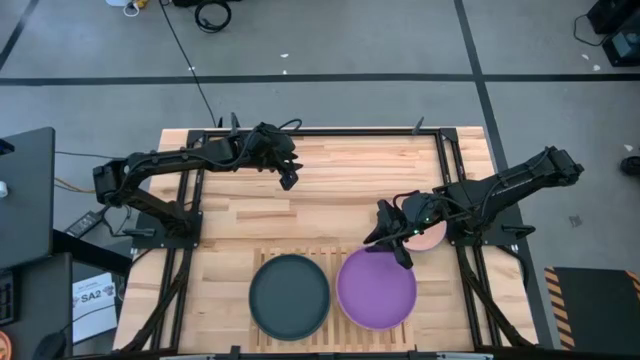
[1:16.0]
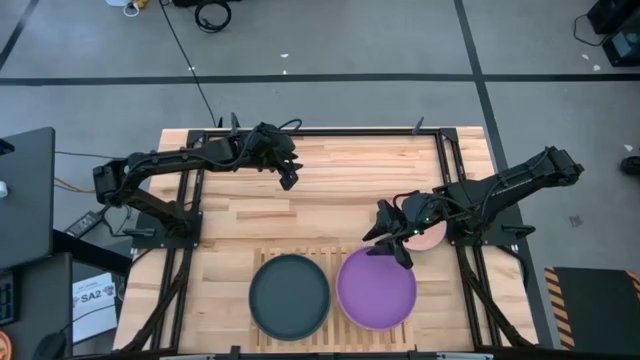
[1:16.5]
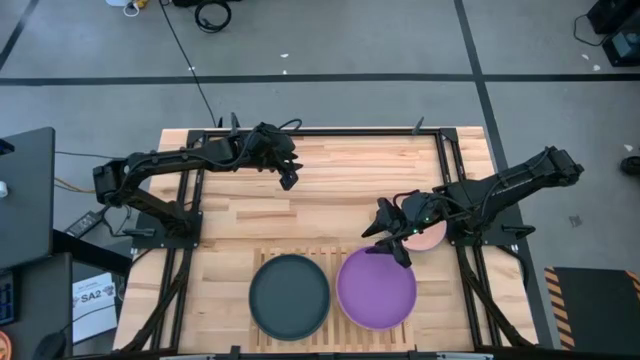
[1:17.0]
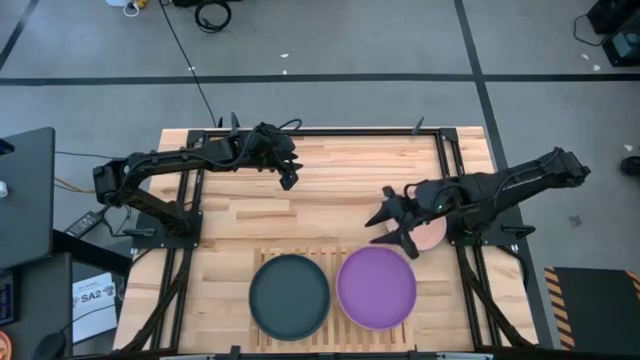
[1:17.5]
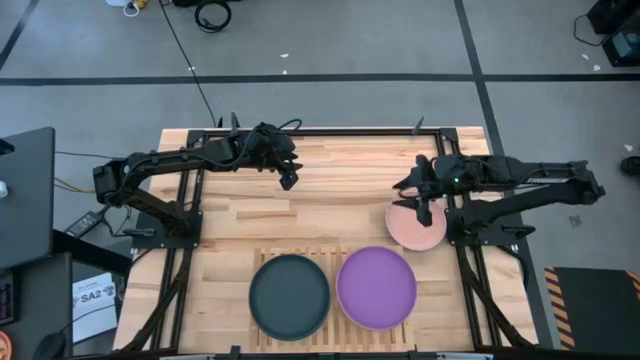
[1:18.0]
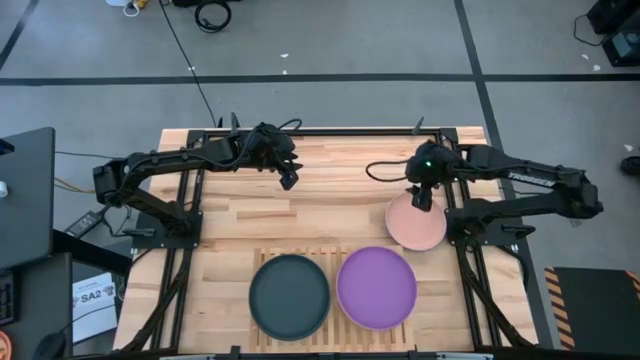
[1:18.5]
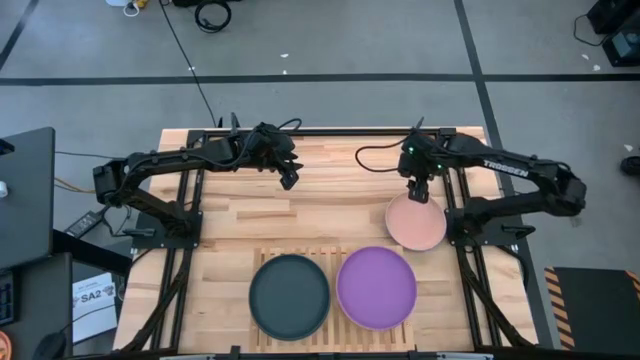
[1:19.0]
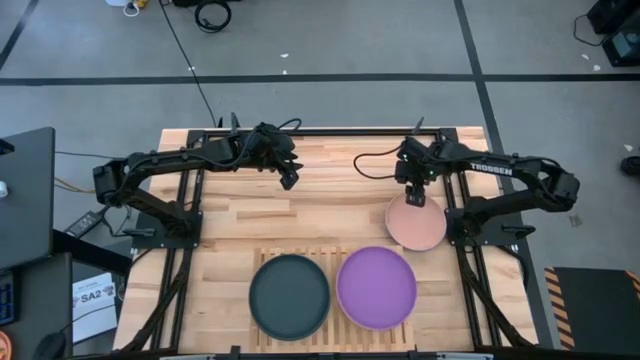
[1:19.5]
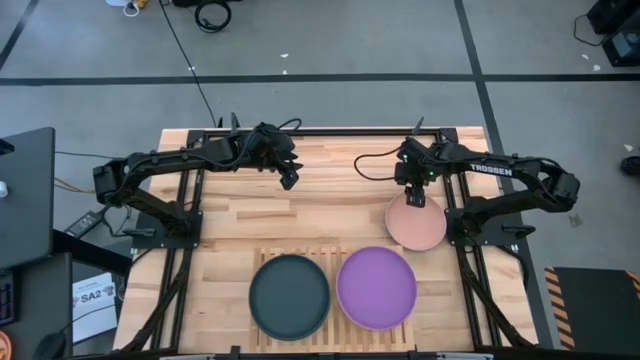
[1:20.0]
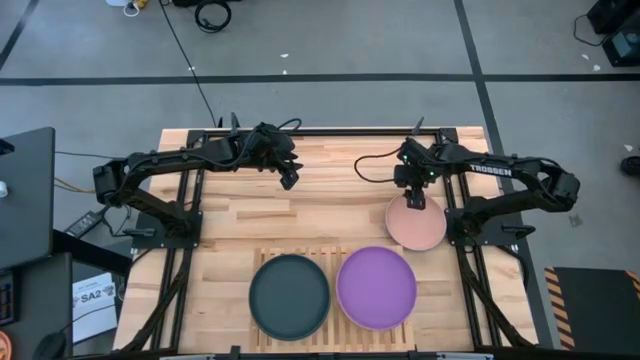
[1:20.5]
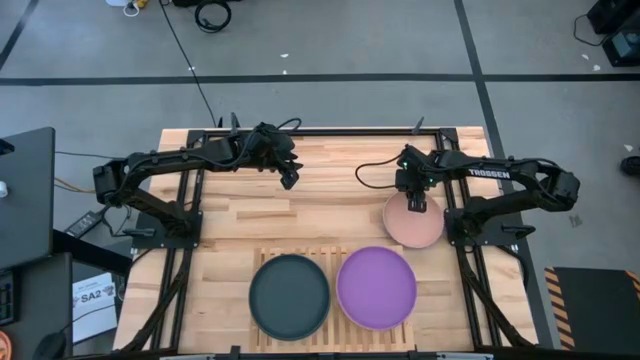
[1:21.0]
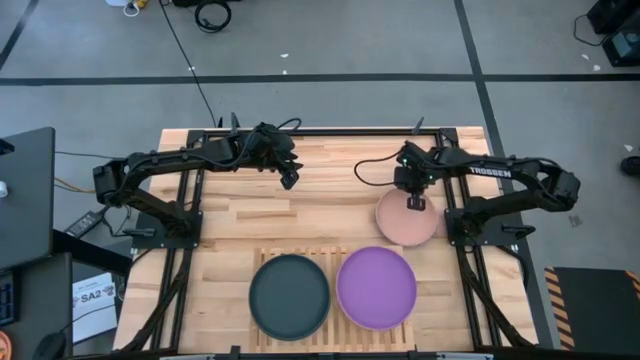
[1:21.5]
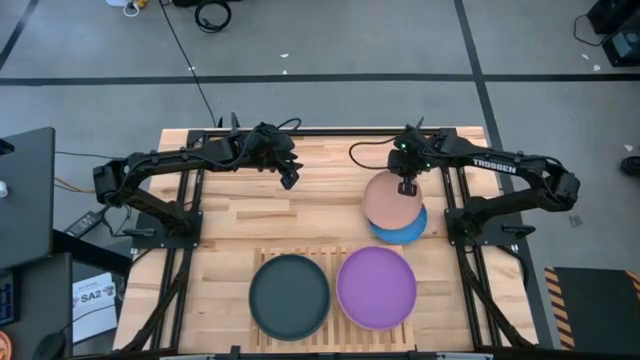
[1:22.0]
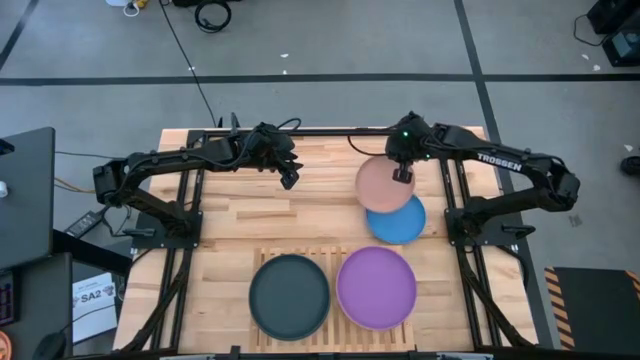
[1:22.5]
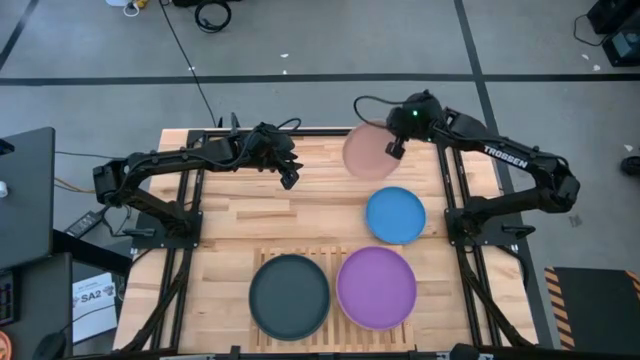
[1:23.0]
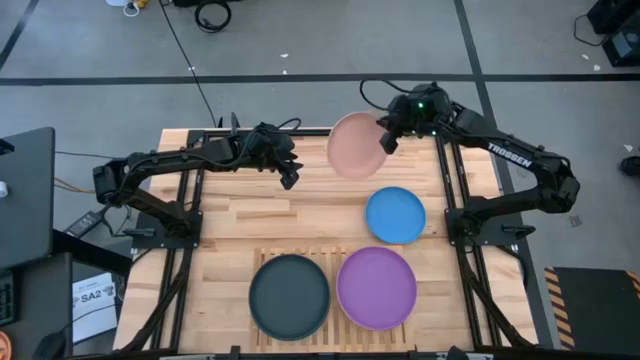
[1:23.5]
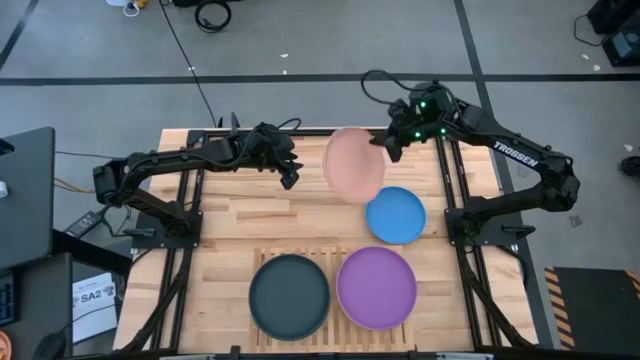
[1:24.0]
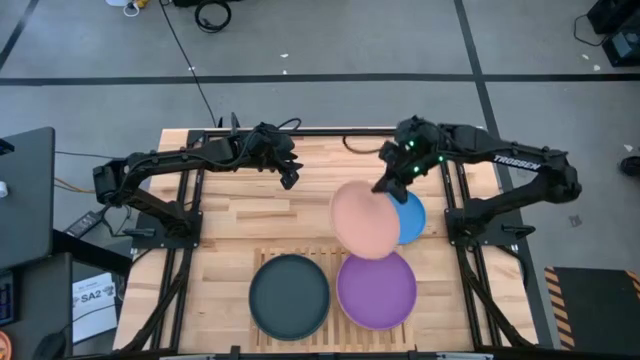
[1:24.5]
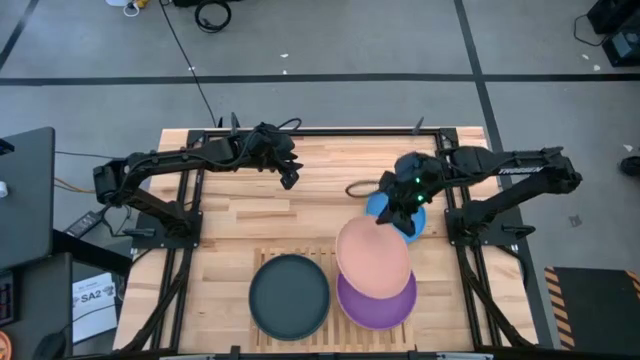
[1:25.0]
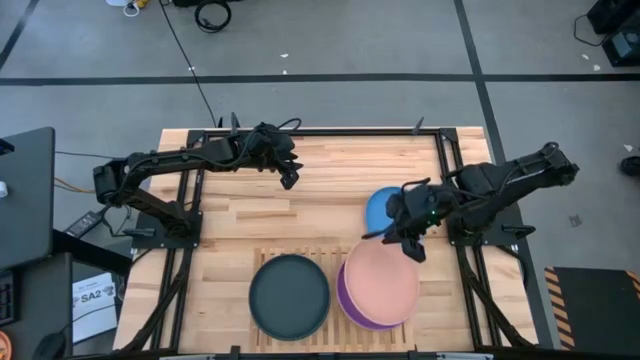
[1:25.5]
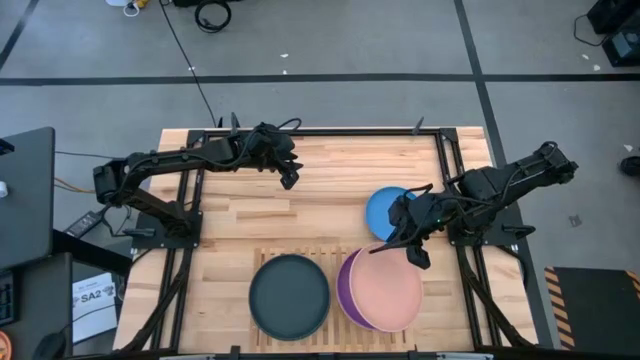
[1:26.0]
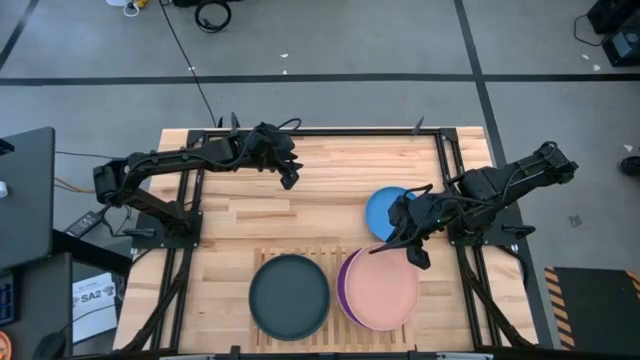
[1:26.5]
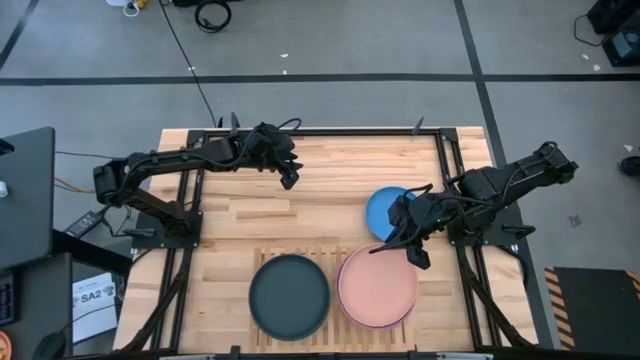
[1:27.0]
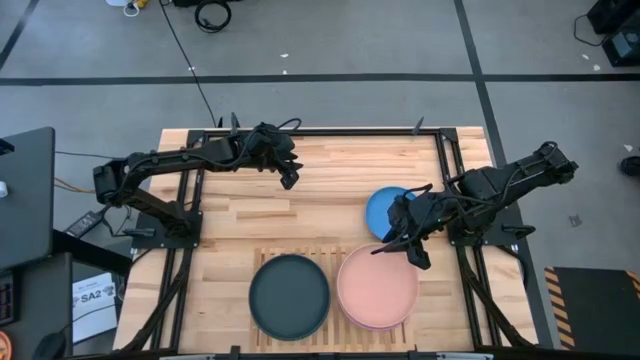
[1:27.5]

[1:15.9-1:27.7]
Task: Place and stack plates onto a shelf
Stack the light orange plate on top of the violet plate on the shelf

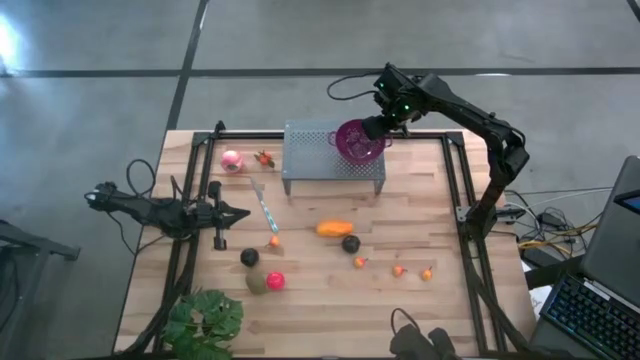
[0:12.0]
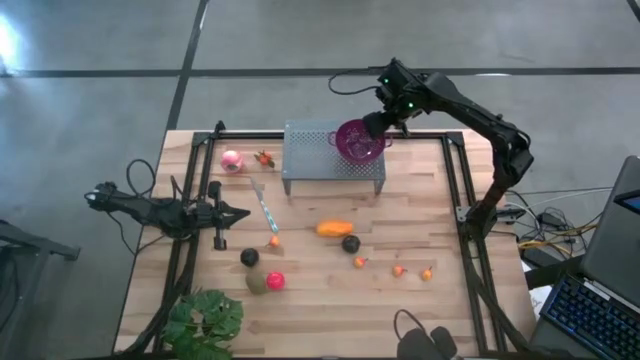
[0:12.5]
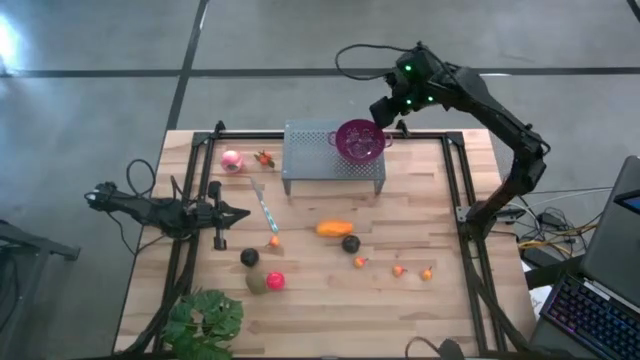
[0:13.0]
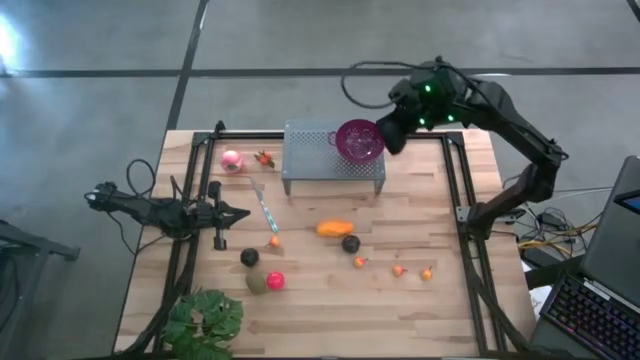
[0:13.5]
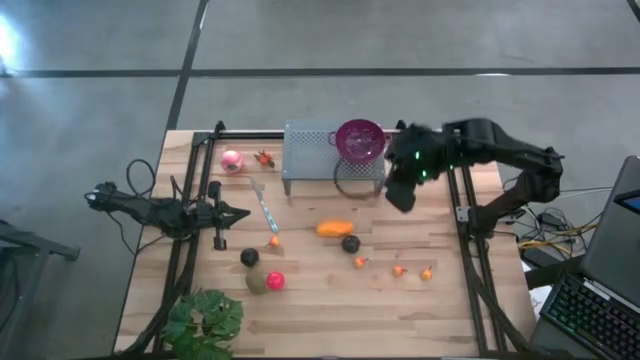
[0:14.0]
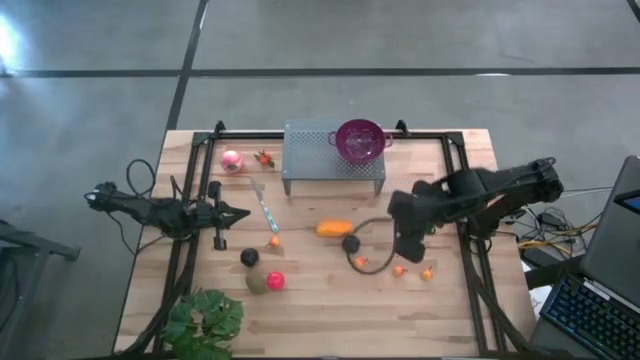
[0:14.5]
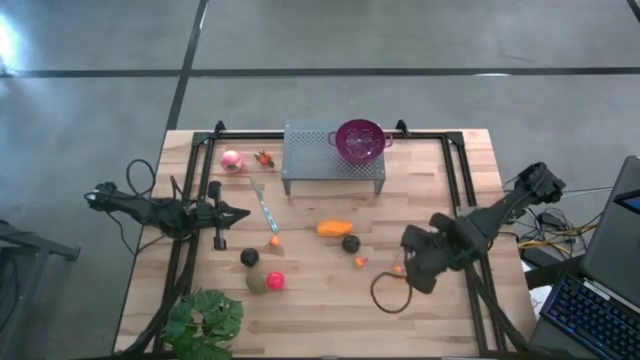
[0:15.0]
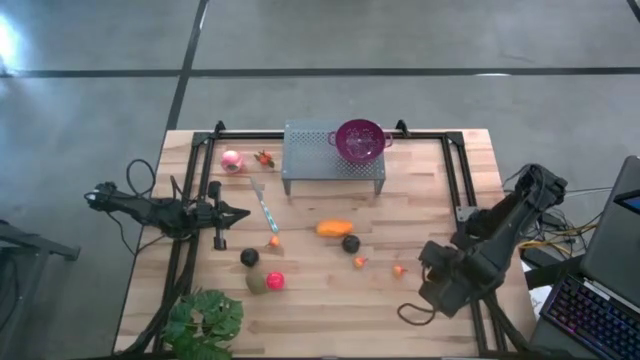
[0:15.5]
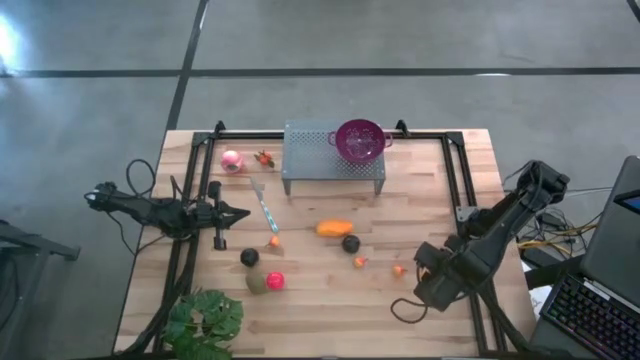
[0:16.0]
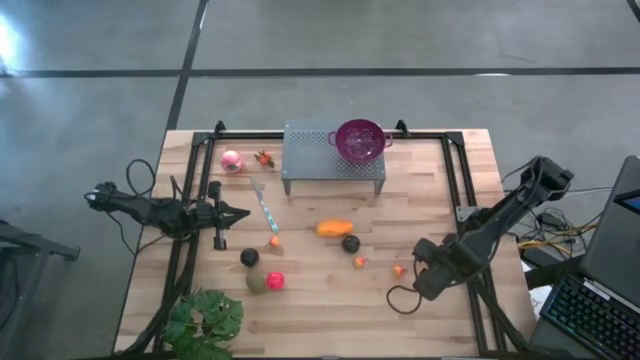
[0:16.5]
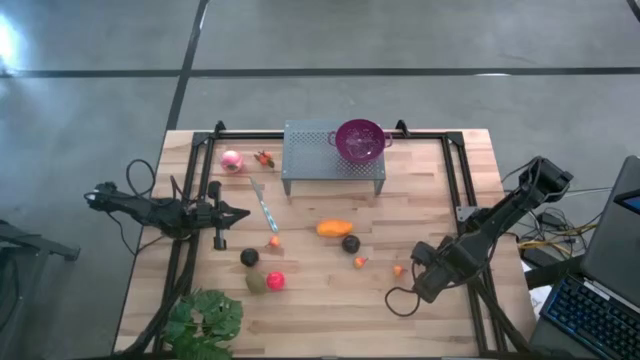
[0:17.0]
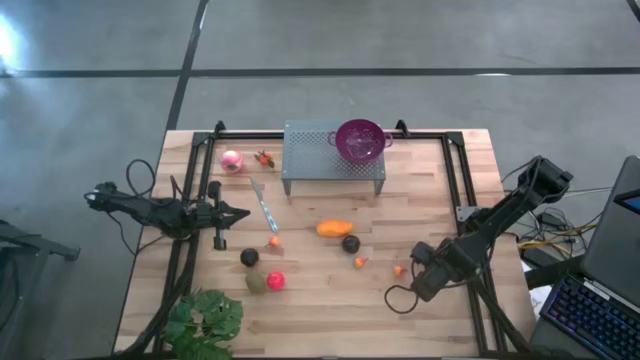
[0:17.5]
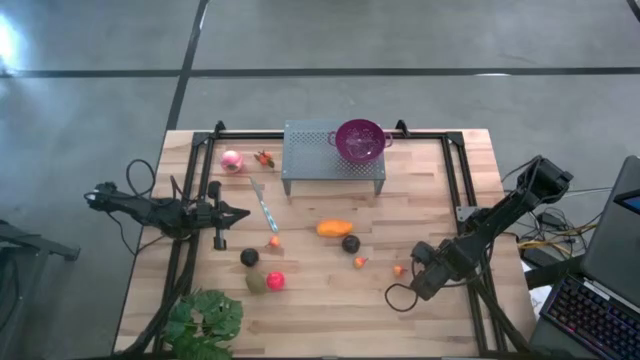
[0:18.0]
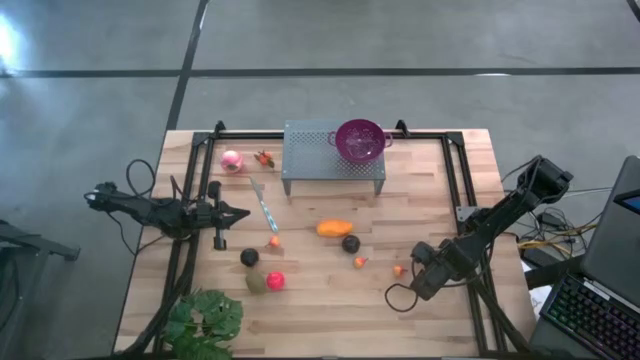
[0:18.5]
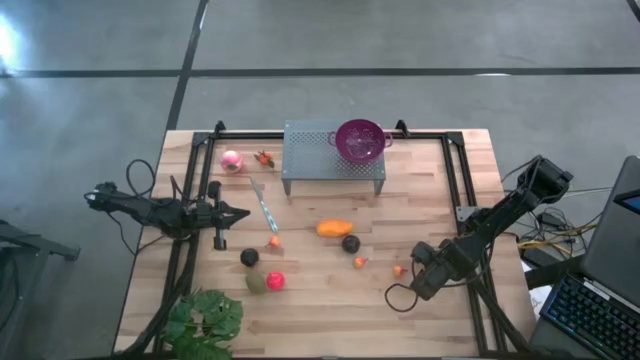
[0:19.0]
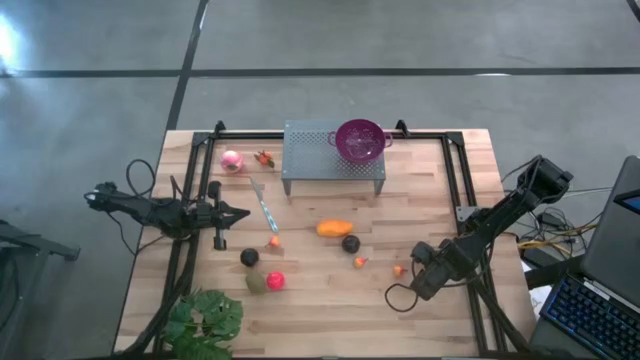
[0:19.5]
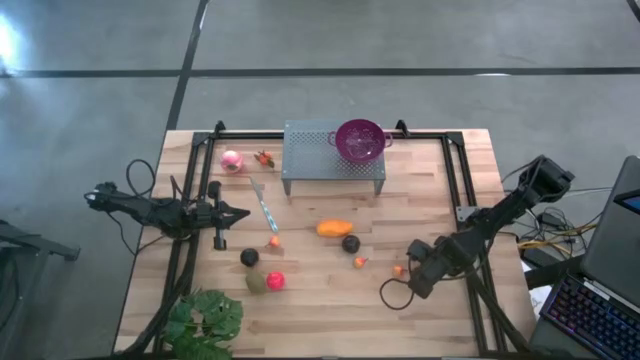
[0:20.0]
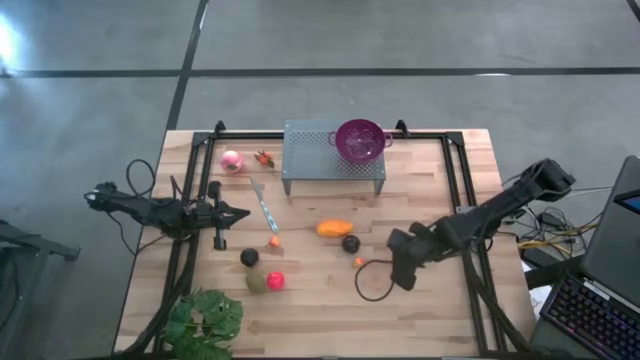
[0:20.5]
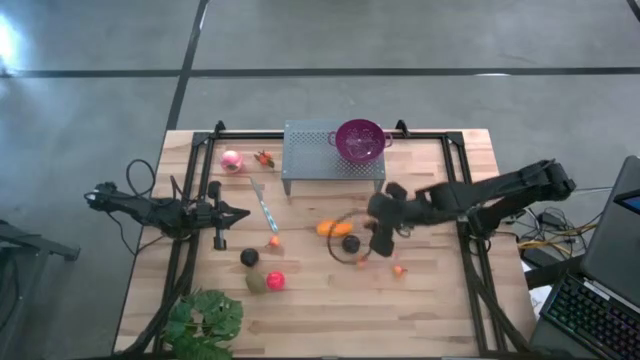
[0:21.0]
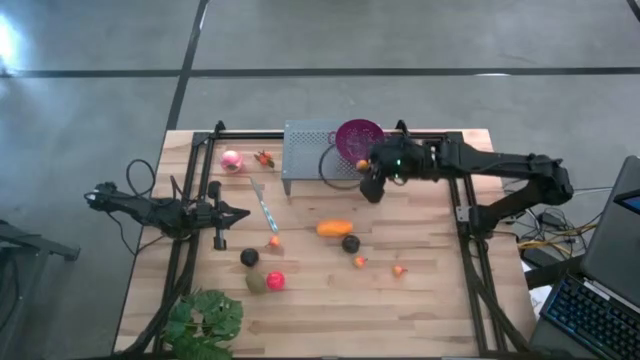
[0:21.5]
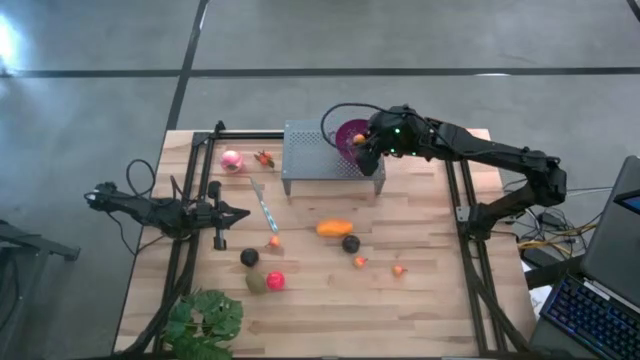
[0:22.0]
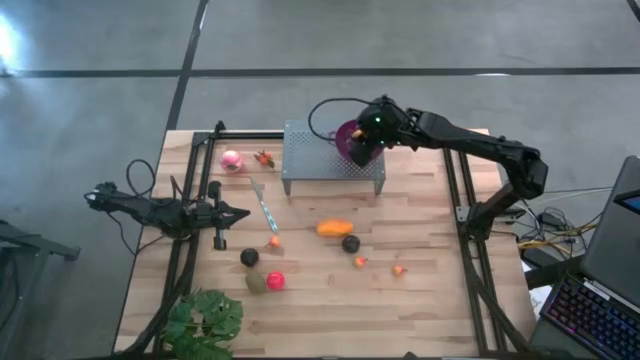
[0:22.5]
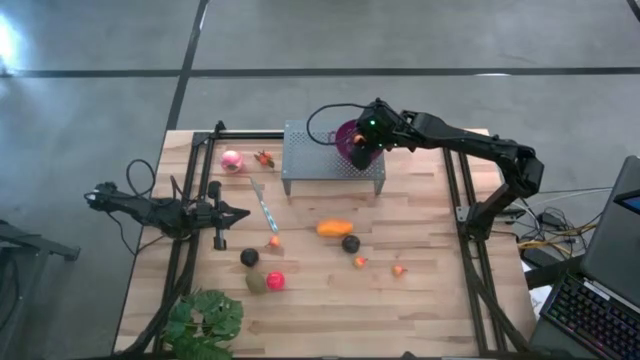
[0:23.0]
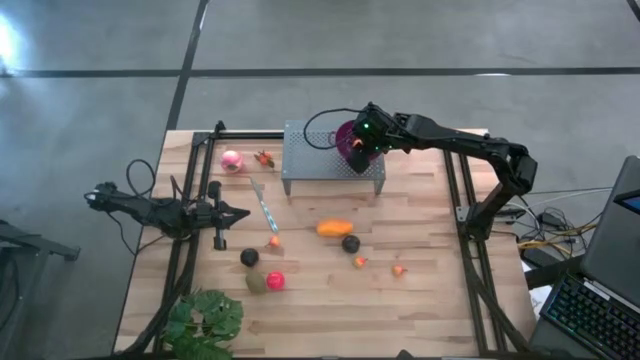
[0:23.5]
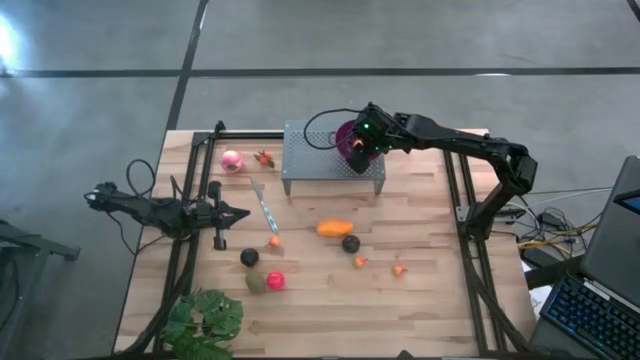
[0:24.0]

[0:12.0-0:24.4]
Task: Pick & Place Fruit
Put the pear into the purple bowl on the shelf
